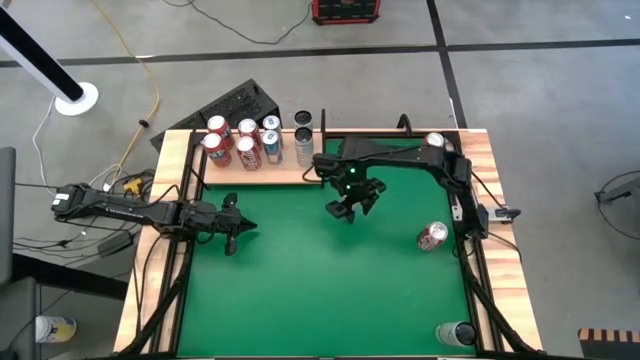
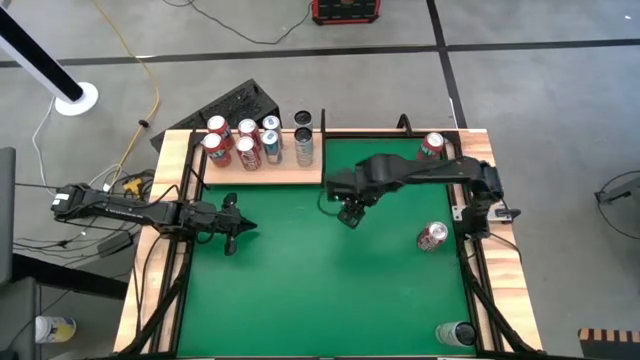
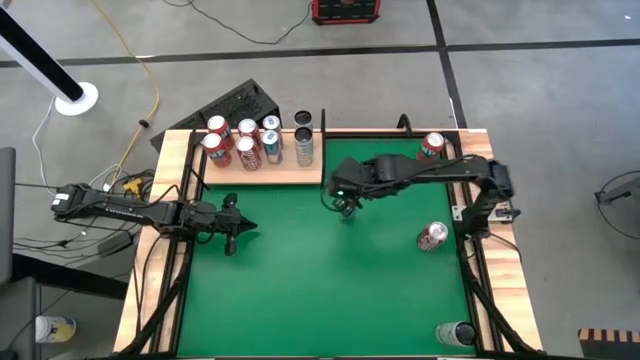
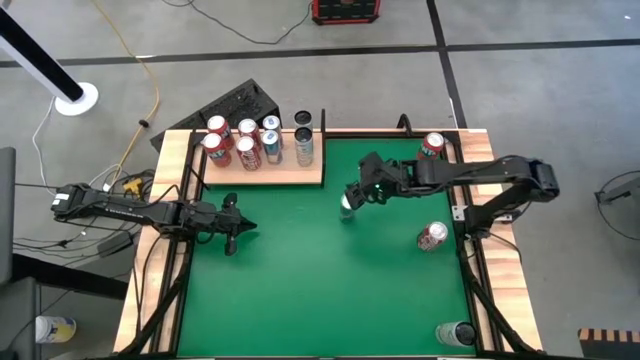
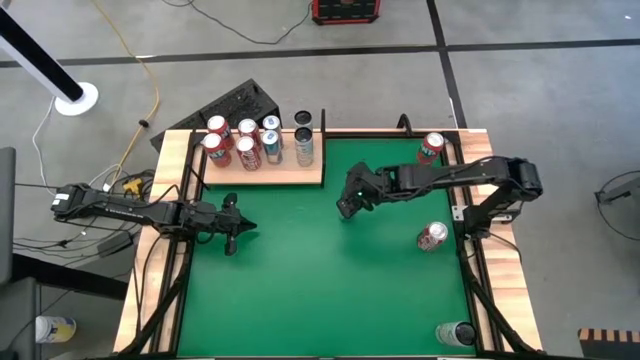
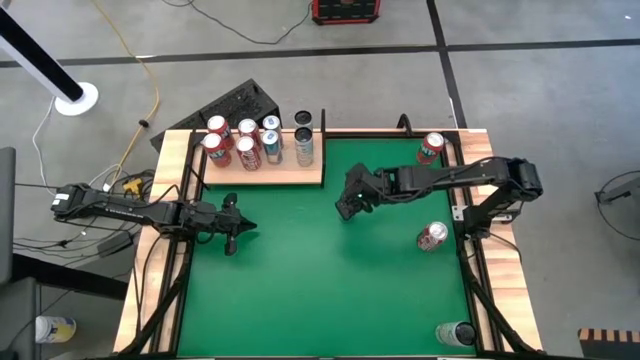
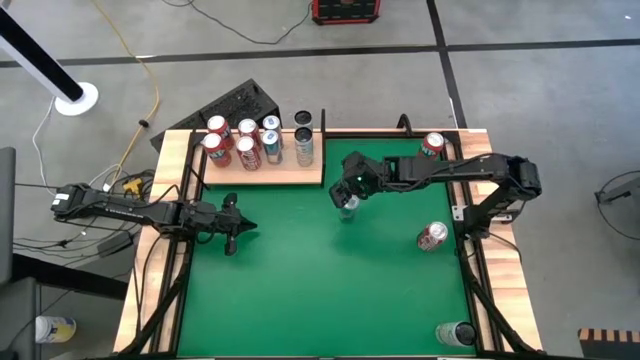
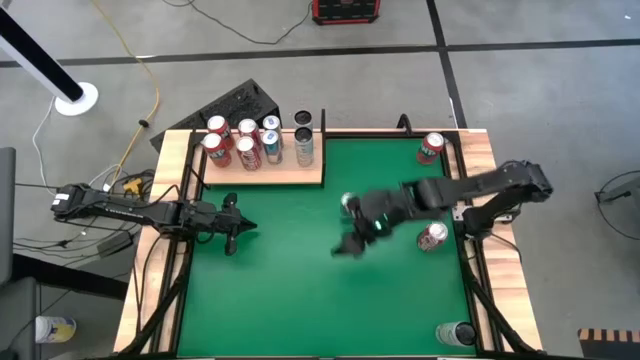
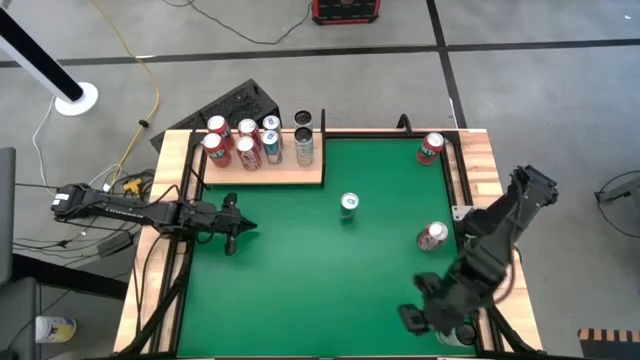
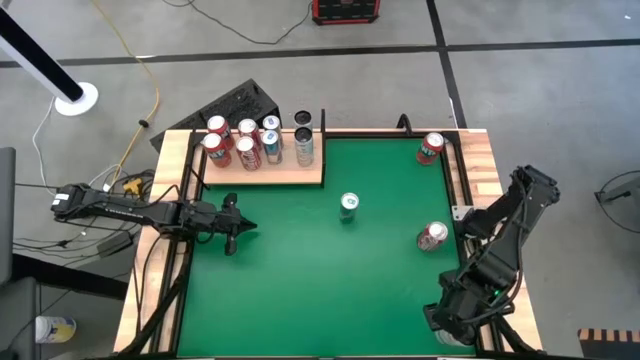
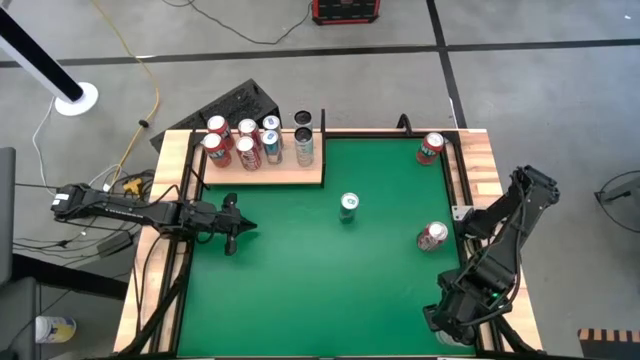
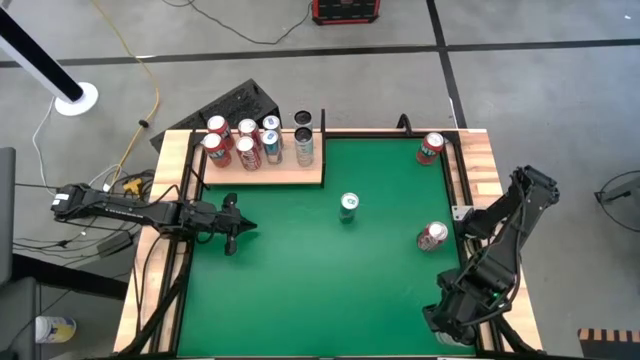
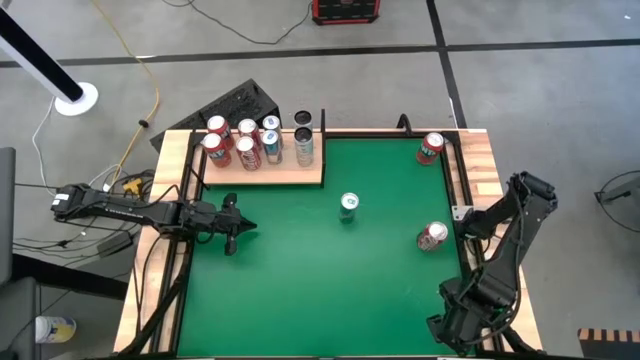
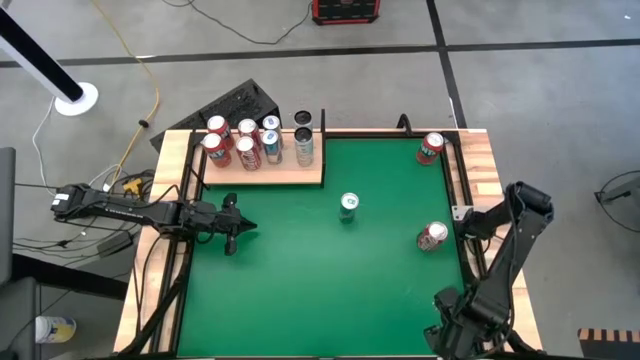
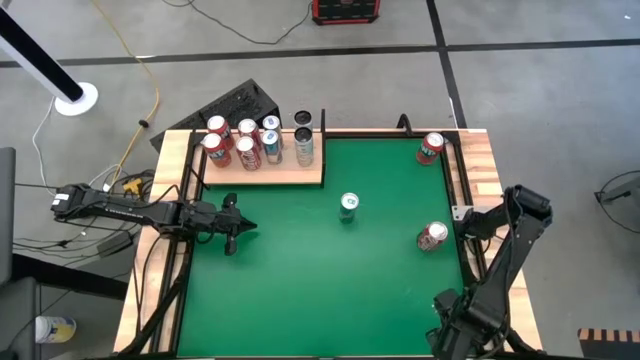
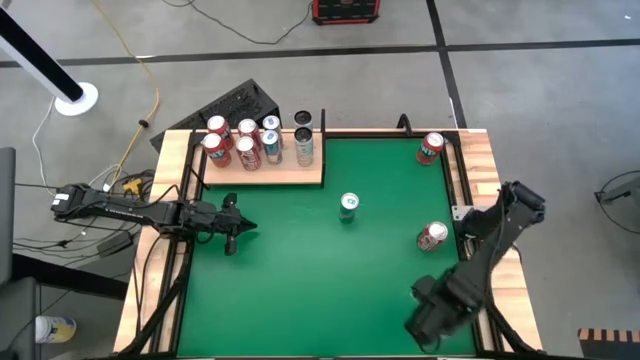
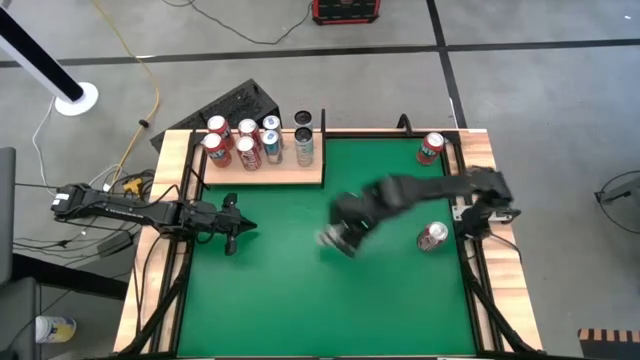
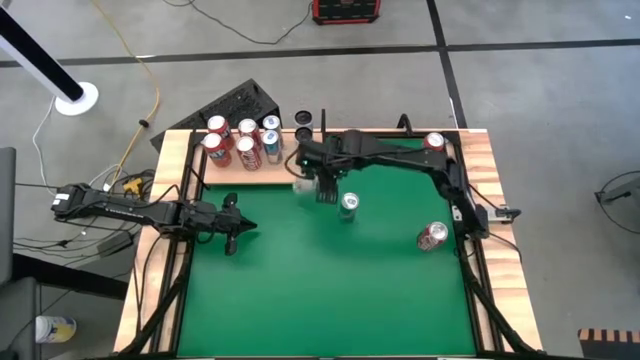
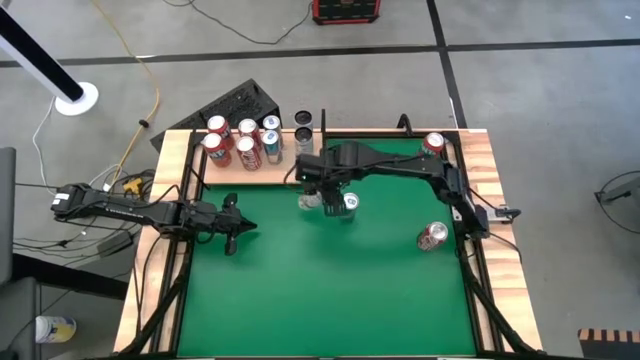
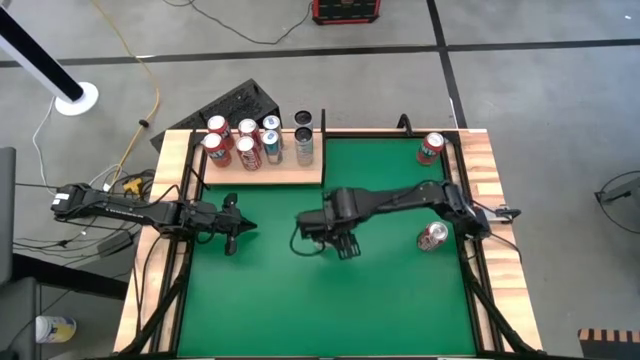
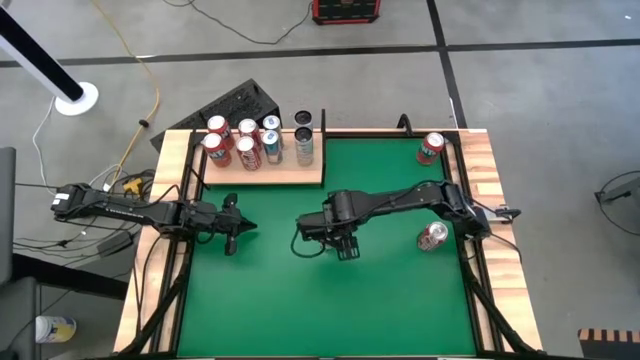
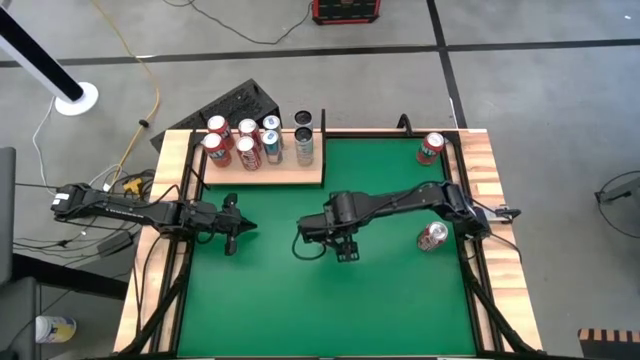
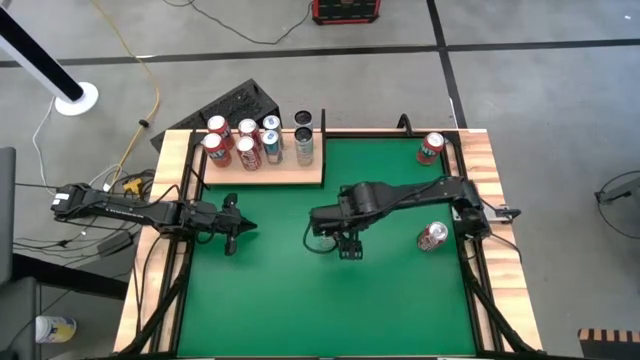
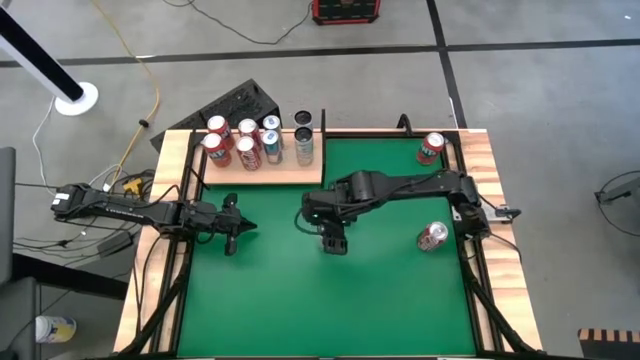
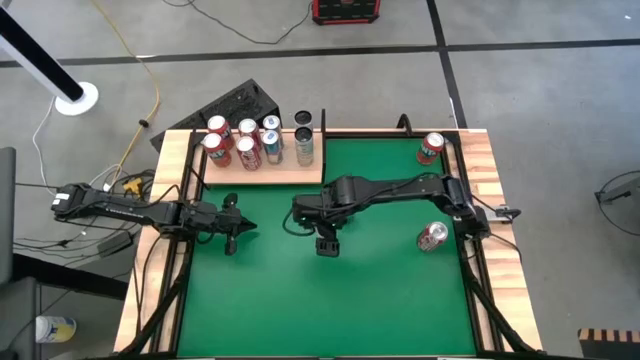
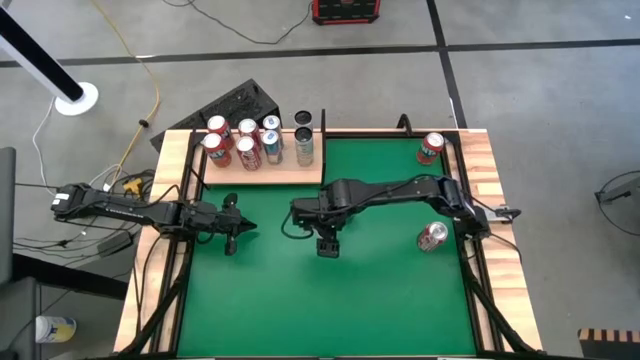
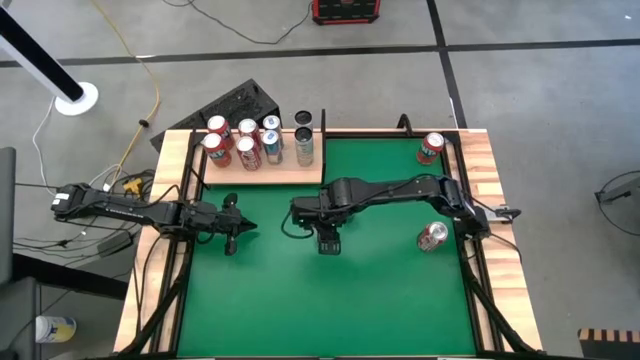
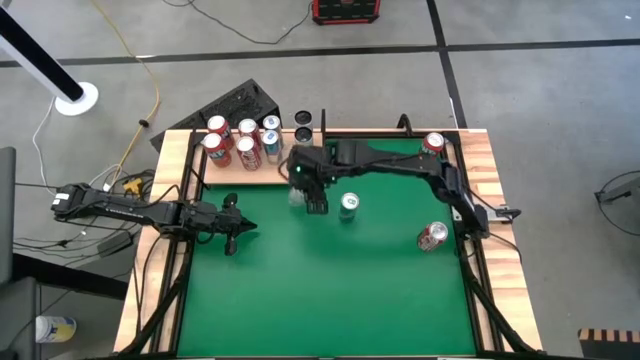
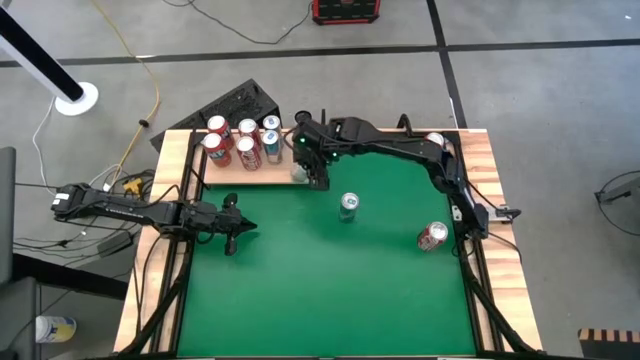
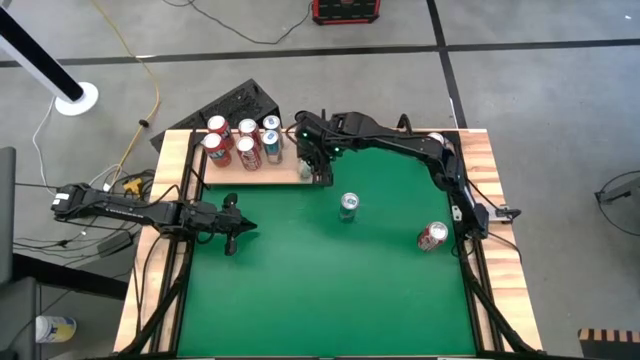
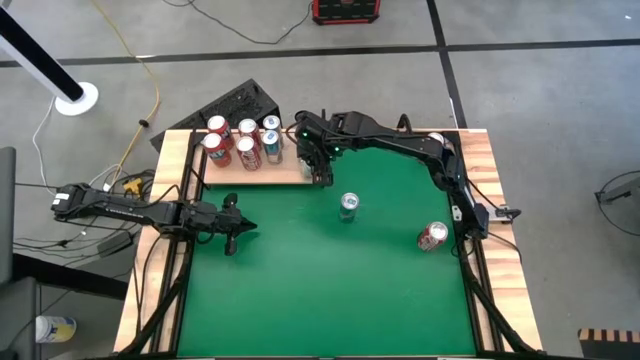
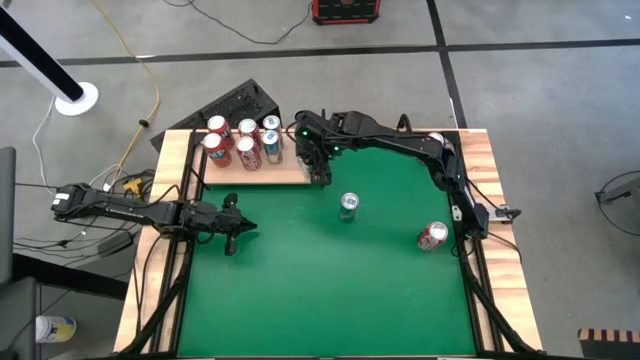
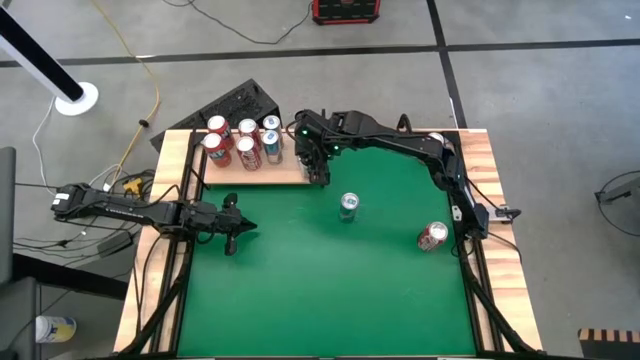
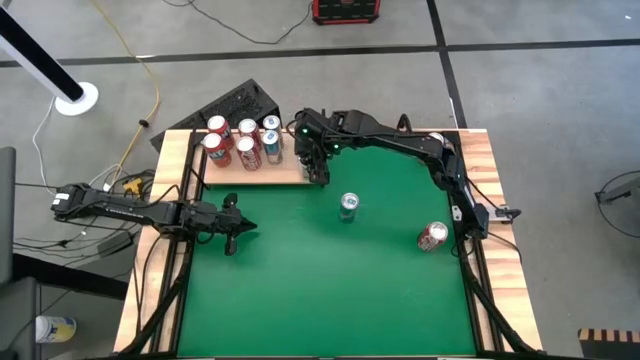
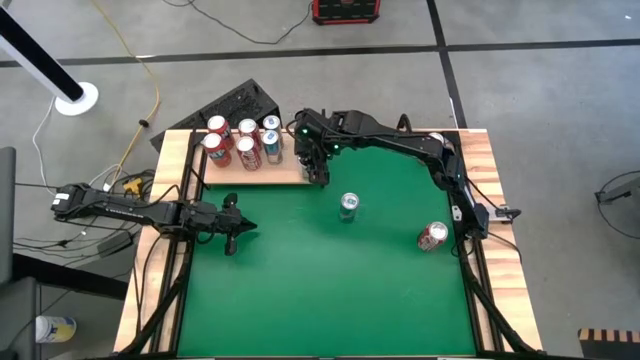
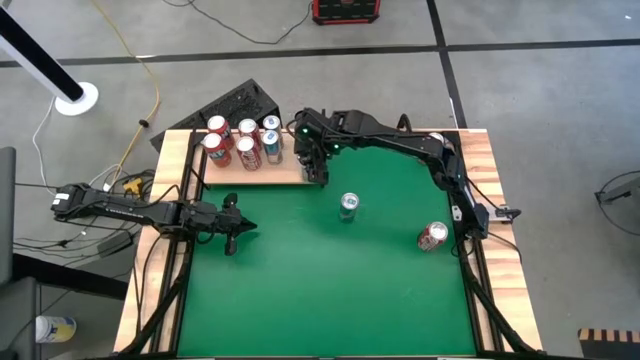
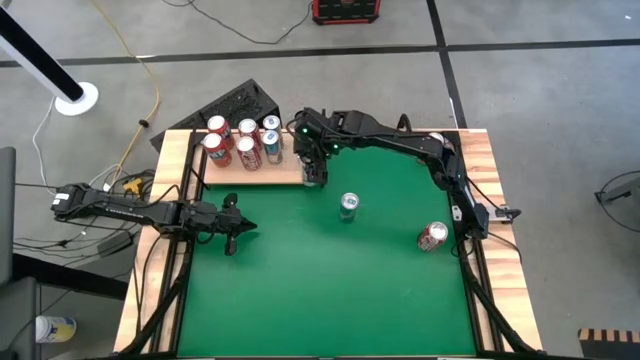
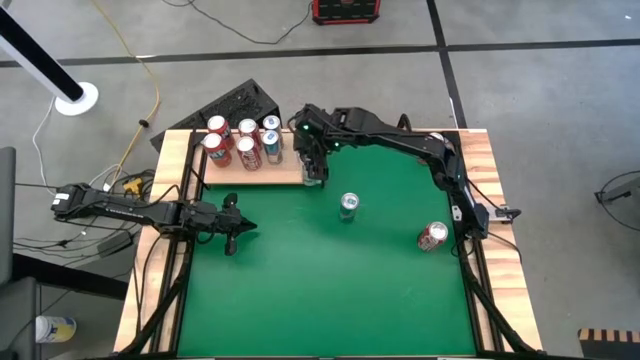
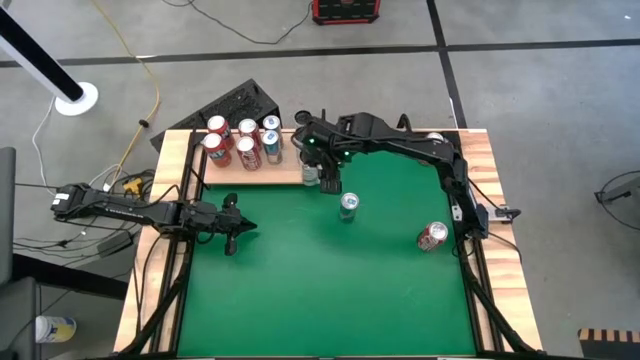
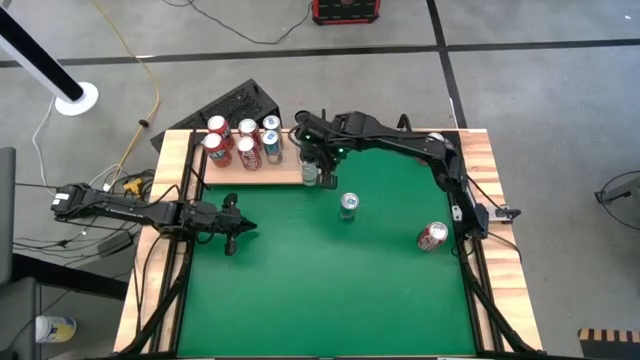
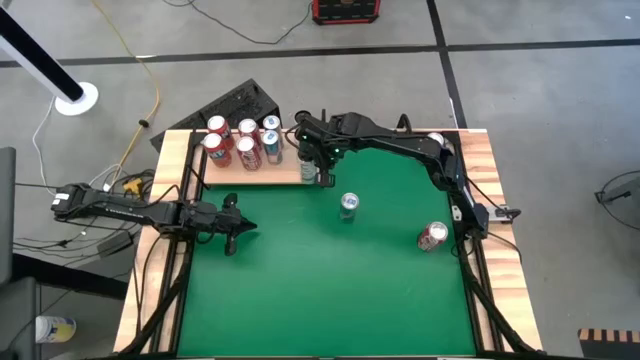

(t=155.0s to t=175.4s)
Task: Place canned beverage on shelf
Put the white and yellow soda can on the shelf aligned with the other white and yellow soda cans

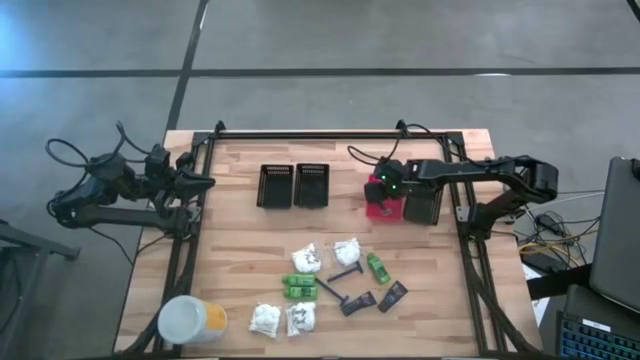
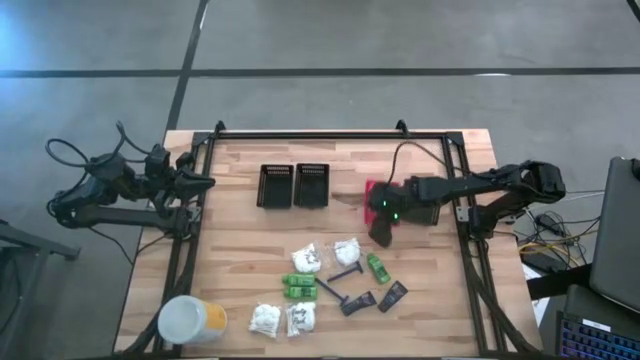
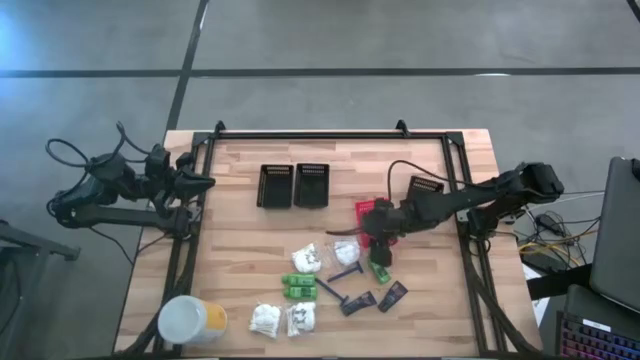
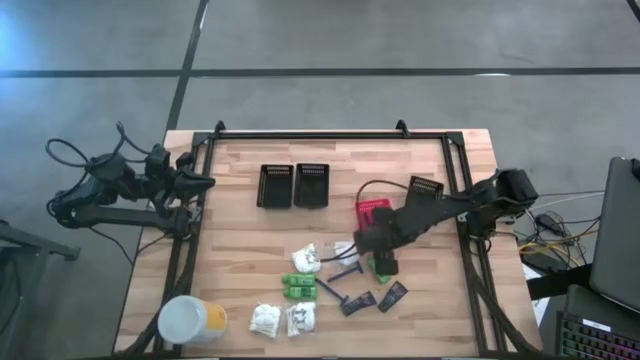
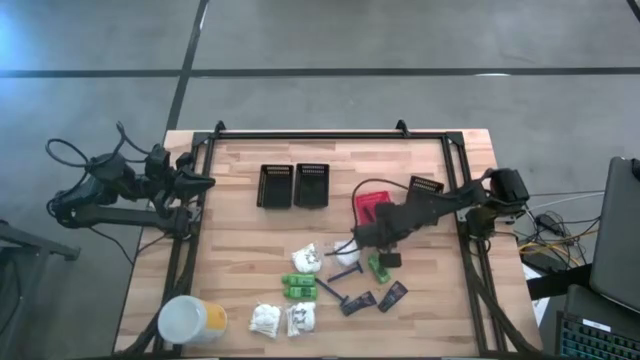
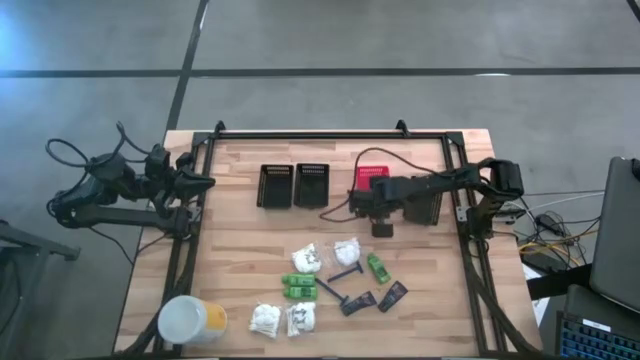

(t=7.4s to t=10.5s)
Task: Pick & Place Travel size toiletries
Adjust the red bin
